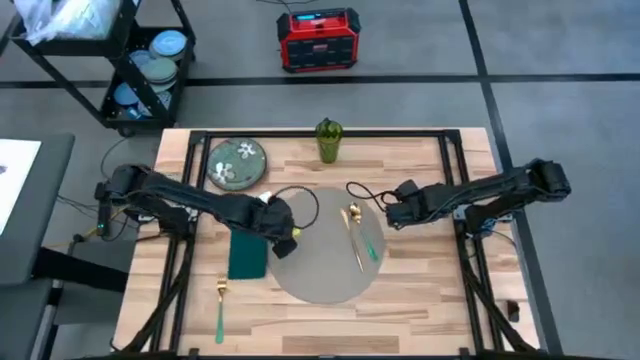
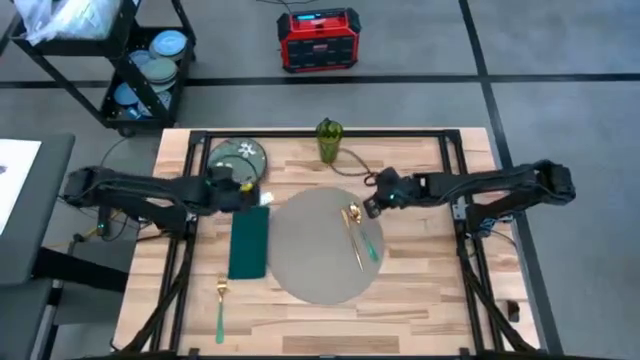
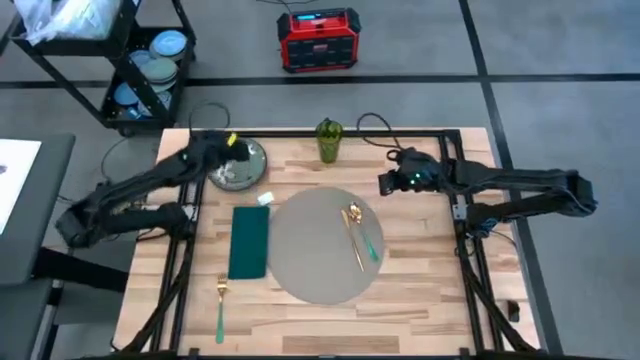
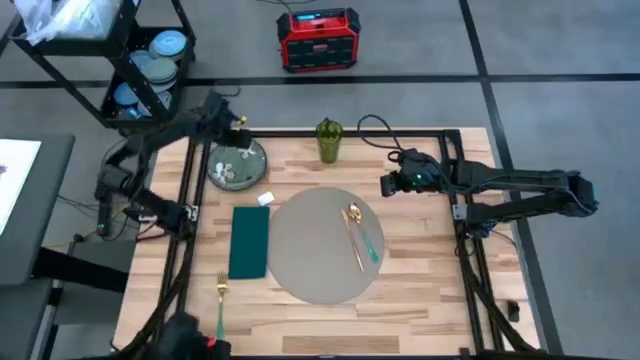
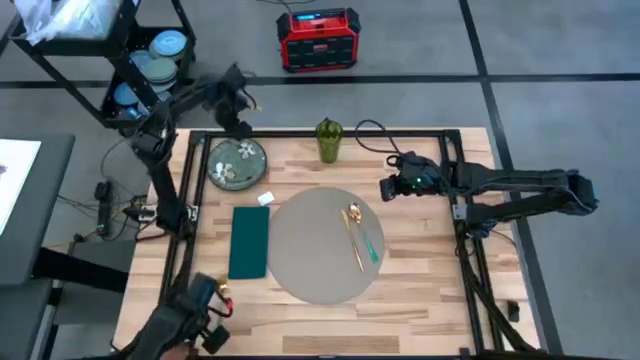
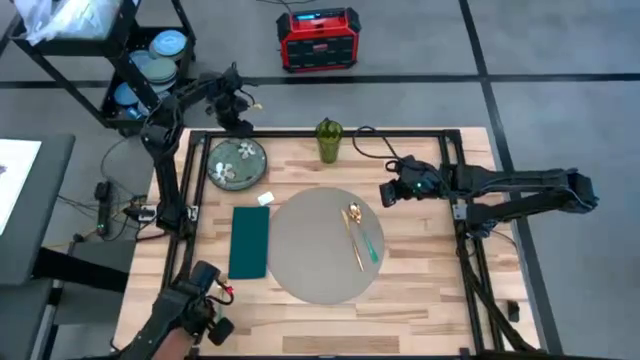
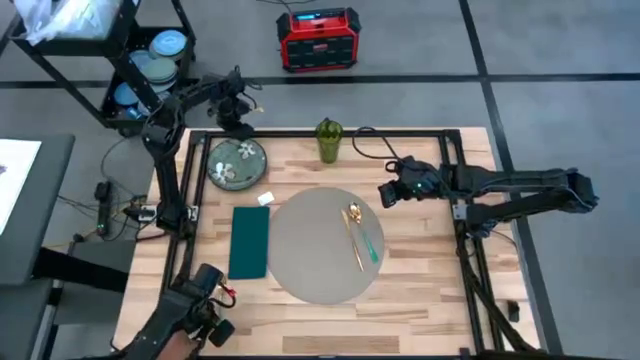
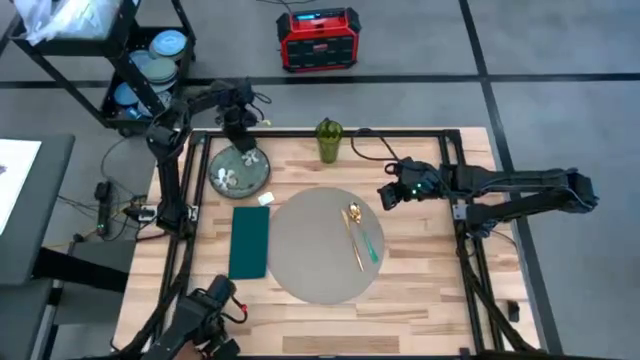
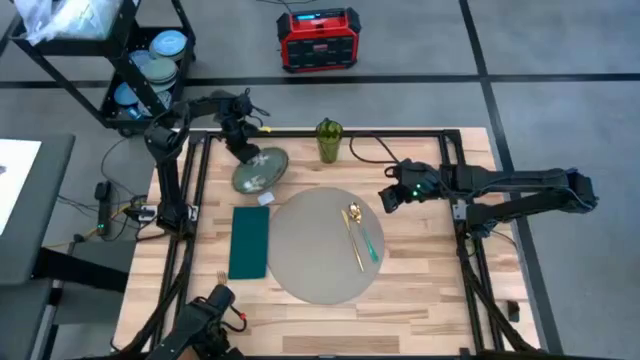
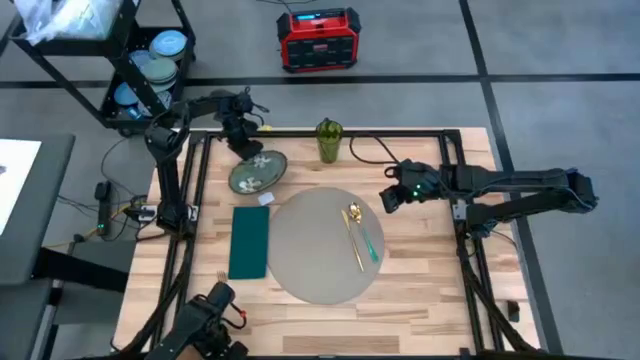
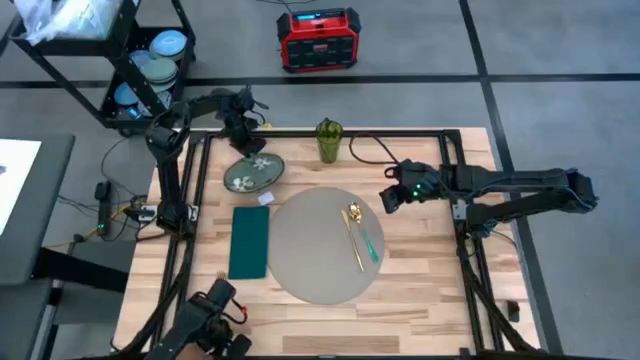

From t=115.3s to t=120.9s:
Task: Set table place
Put the plate on the gray table mat

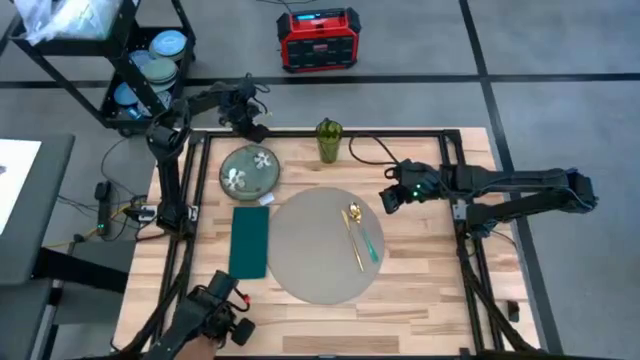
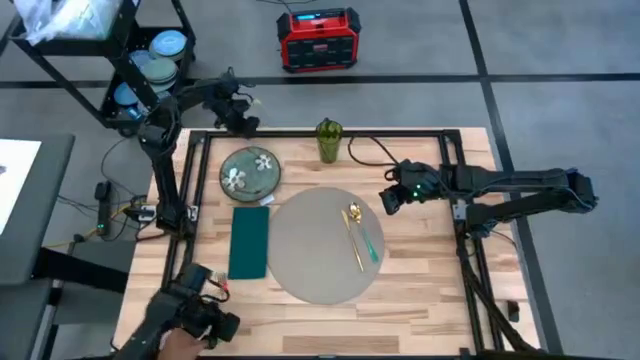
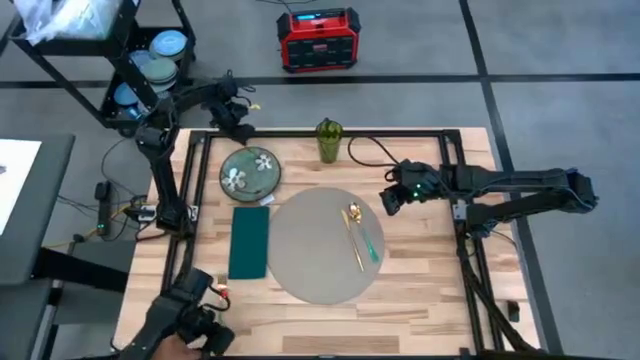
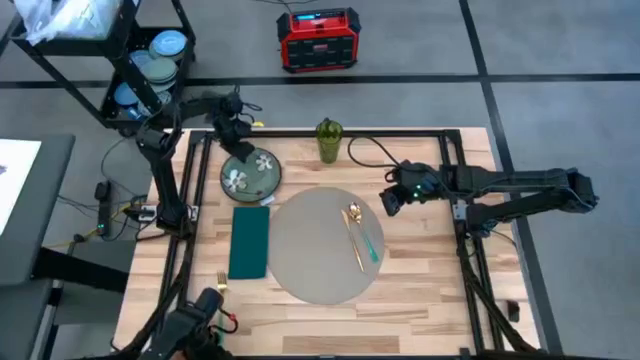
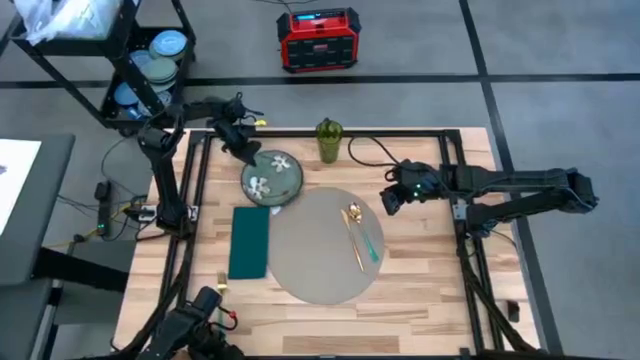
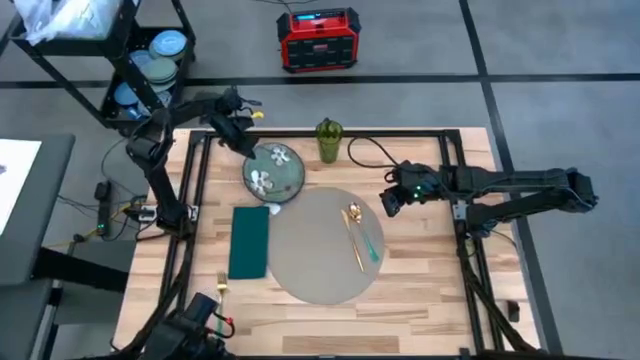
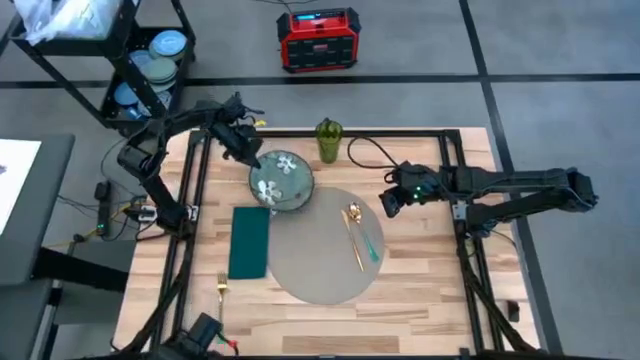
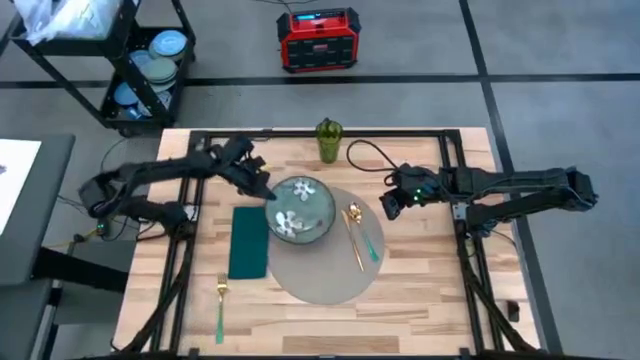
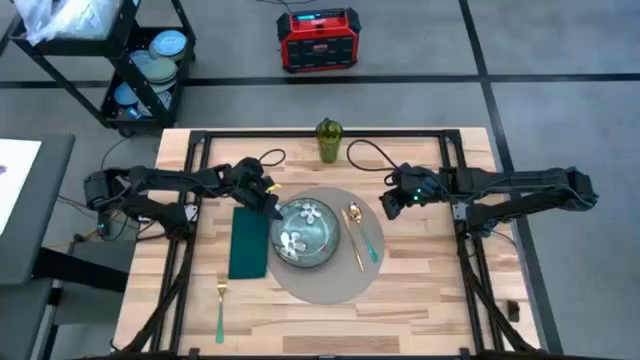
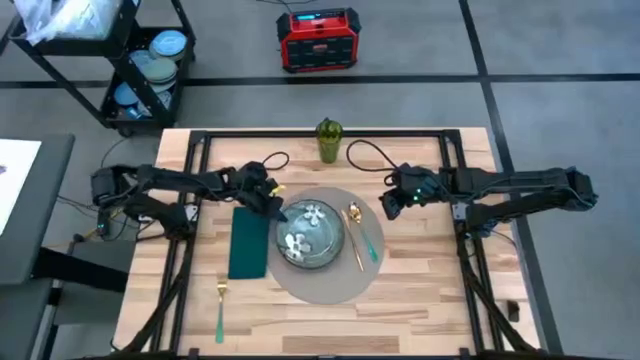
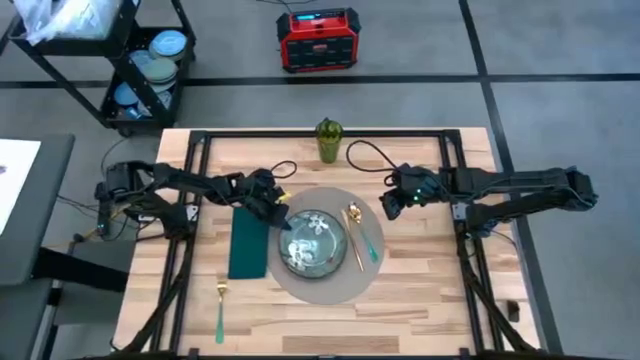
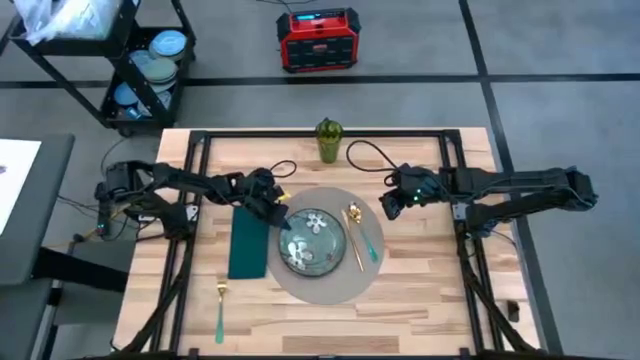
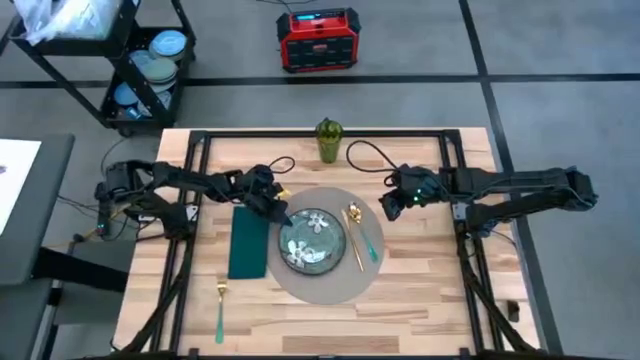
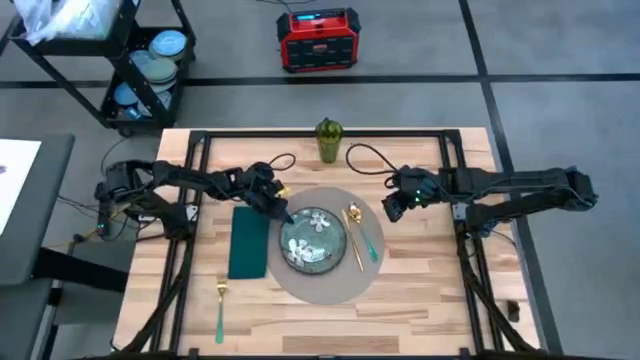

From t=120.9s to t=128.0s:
Put the plate on the gray table mat

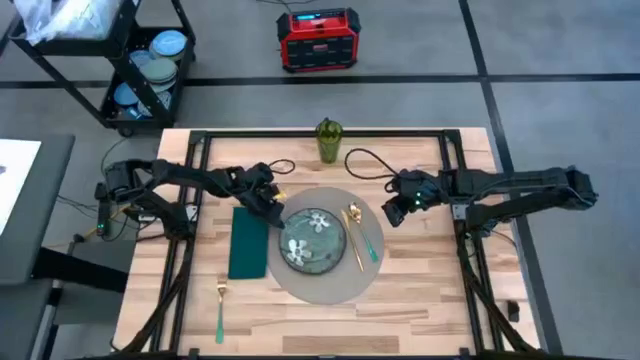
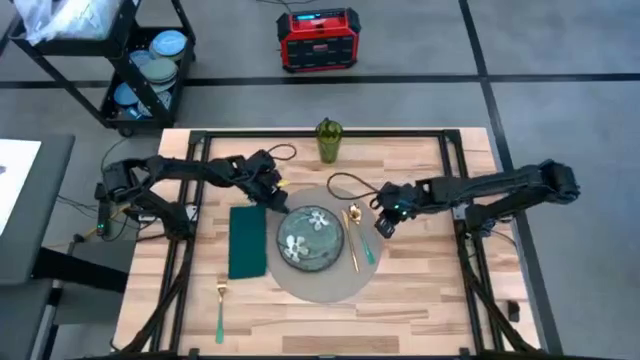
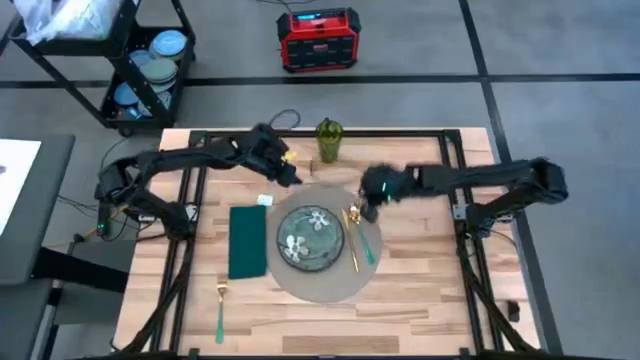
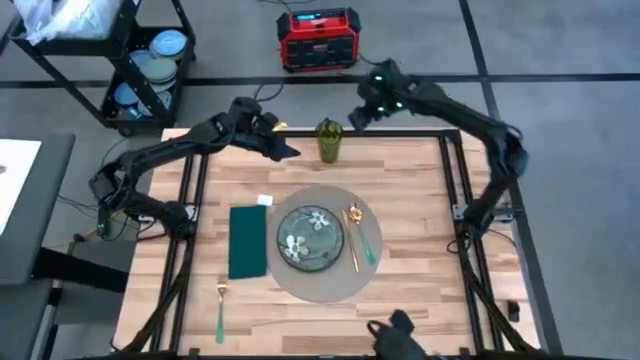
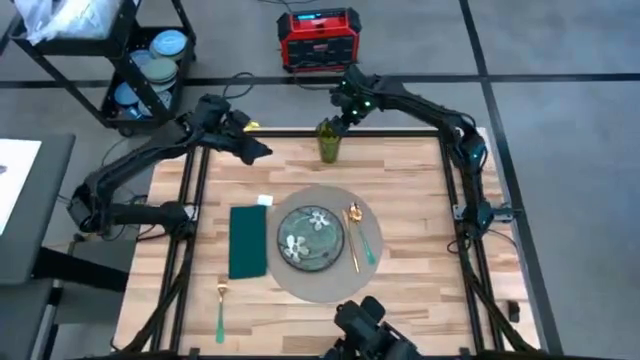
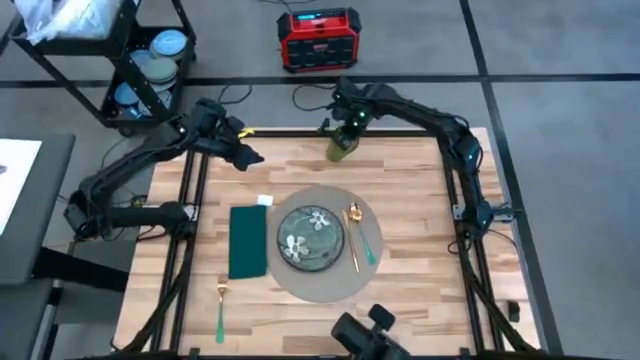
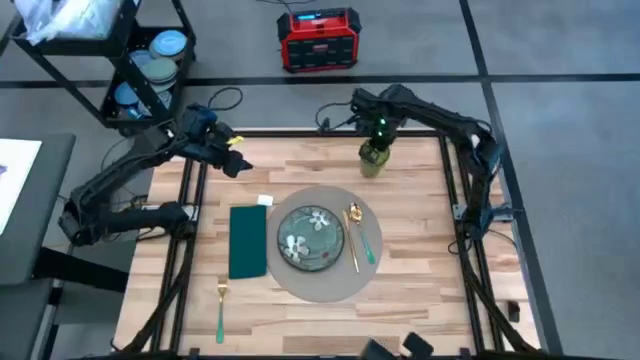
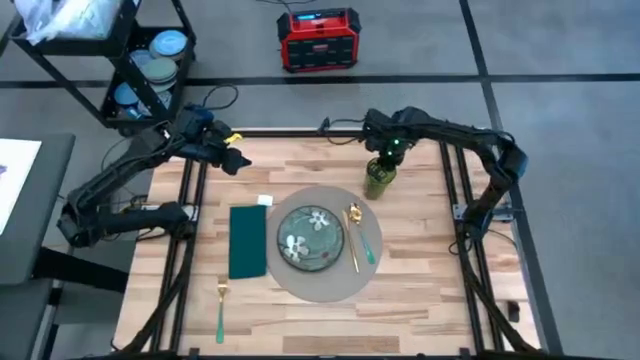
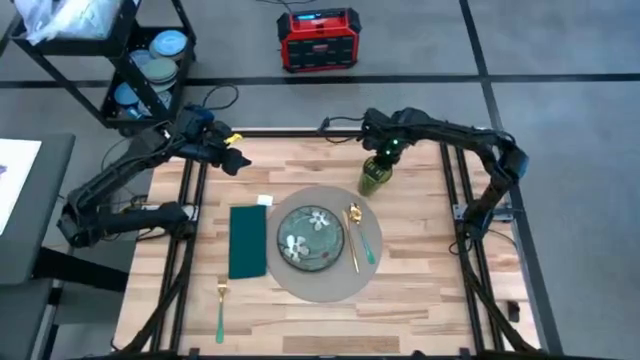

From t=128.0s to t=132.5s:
Move the green cup to the top right of the the gray table mat

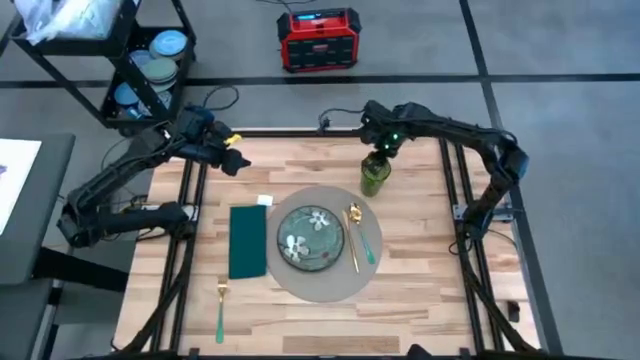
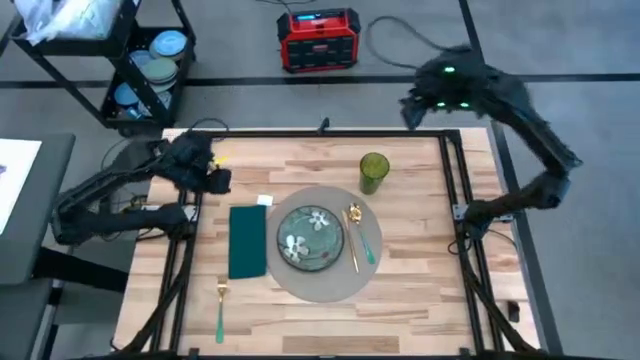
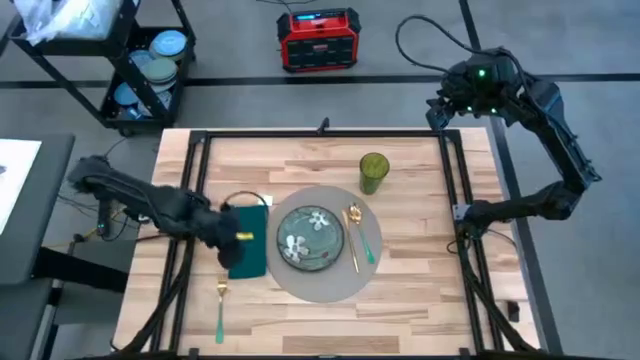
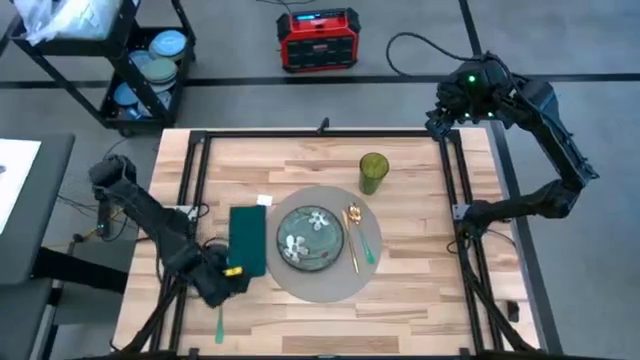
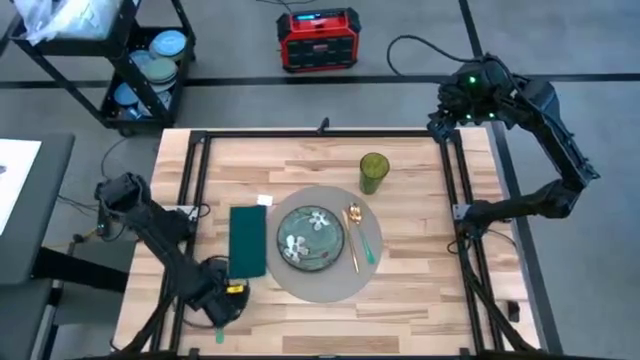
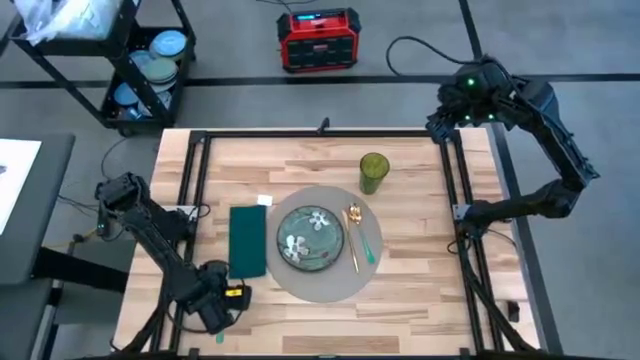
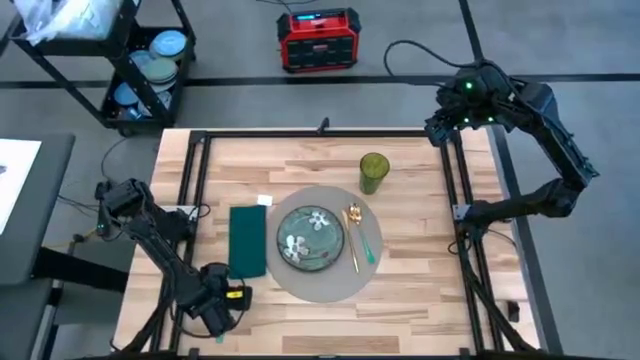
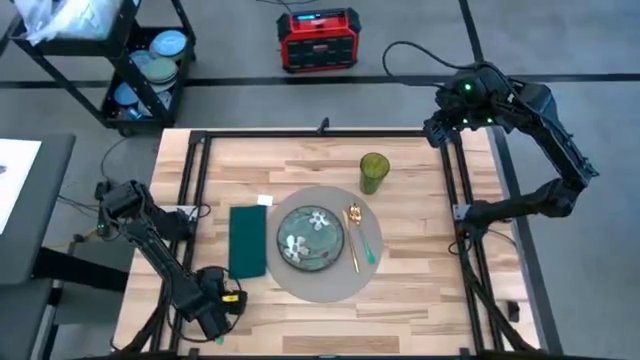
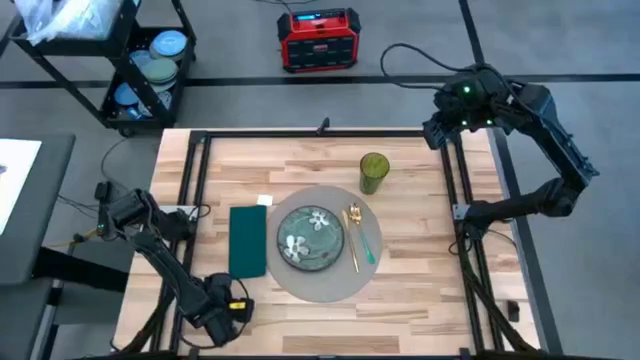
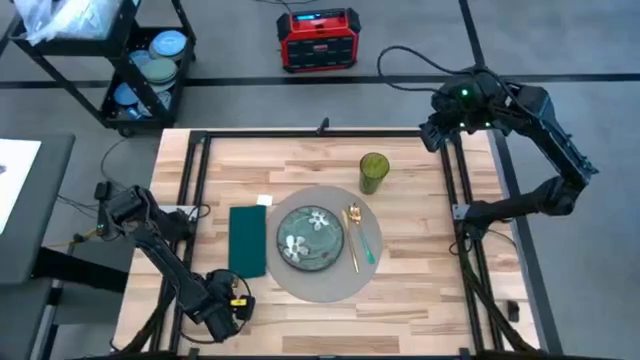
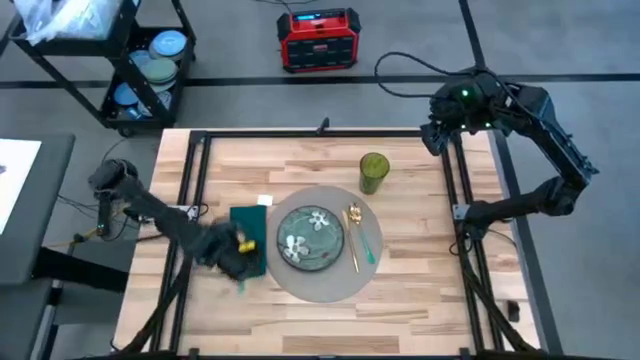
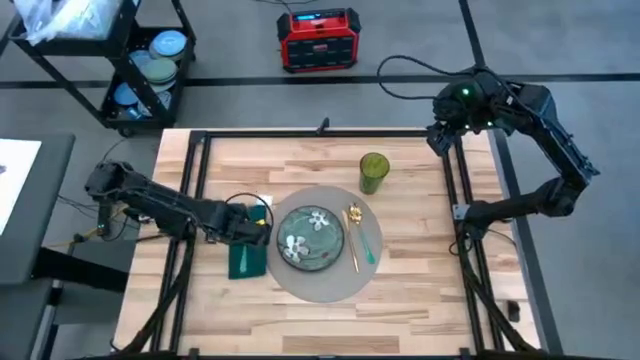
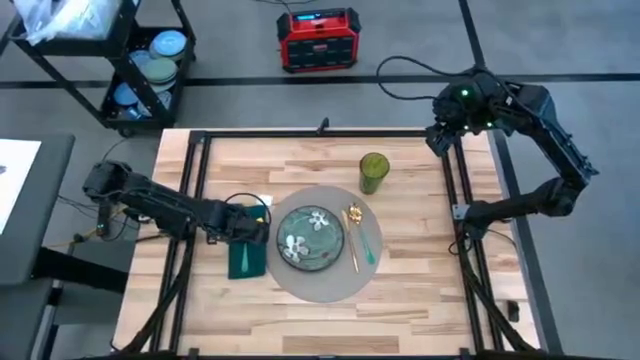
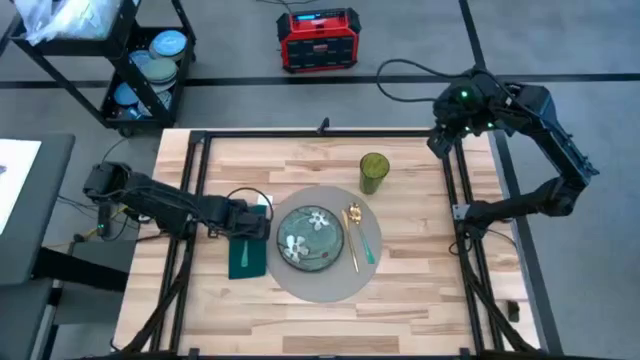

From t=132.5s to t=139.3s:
Put the green fork on top of the blue napkin
